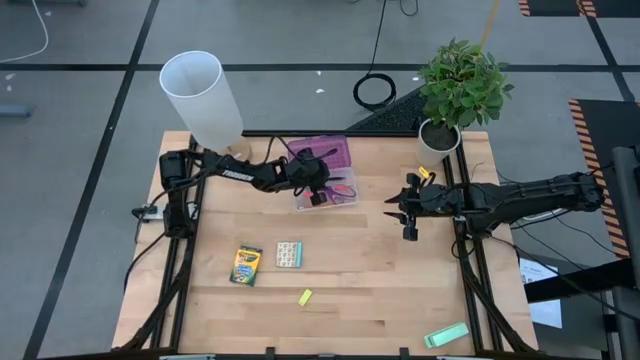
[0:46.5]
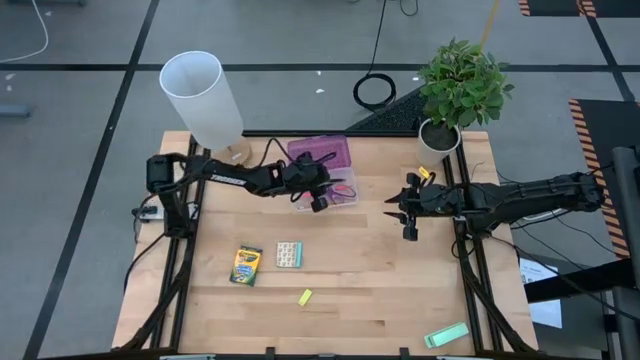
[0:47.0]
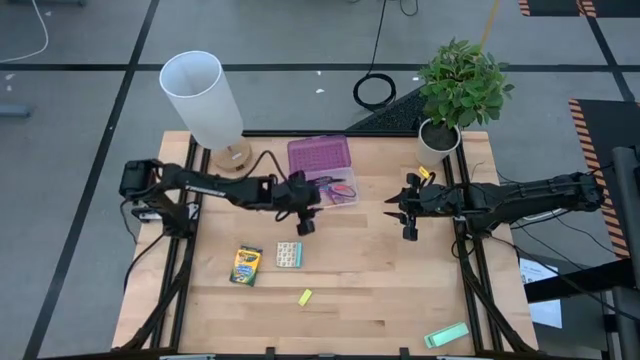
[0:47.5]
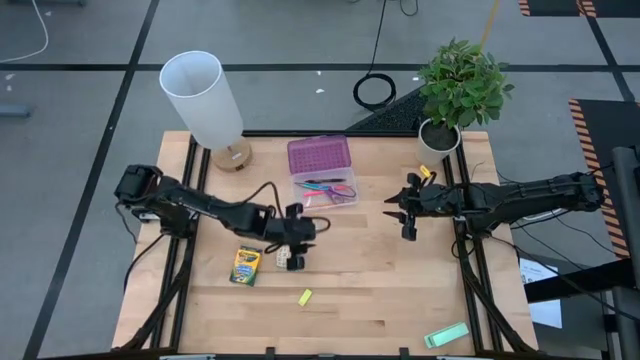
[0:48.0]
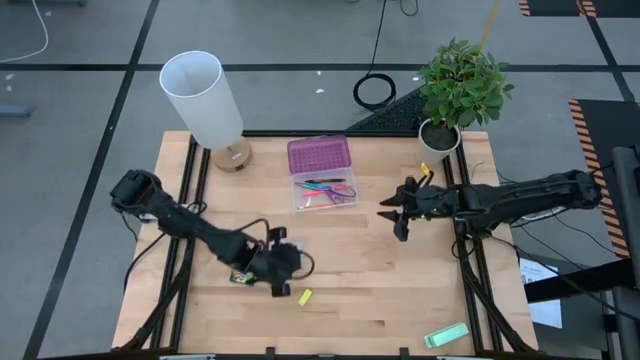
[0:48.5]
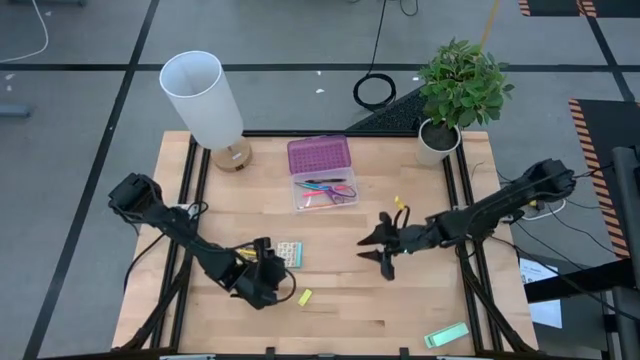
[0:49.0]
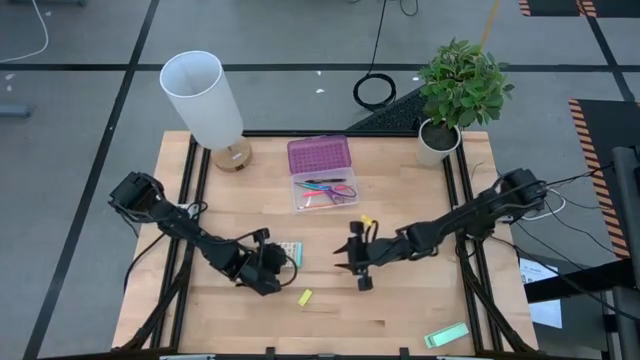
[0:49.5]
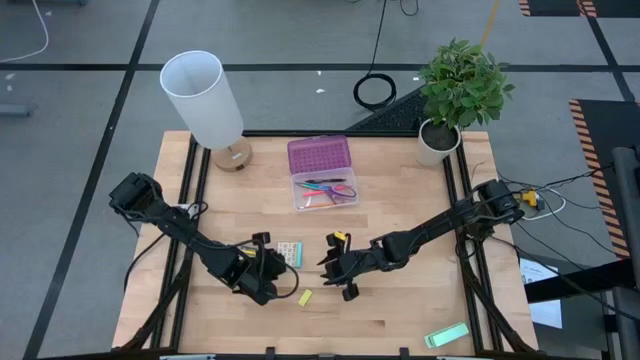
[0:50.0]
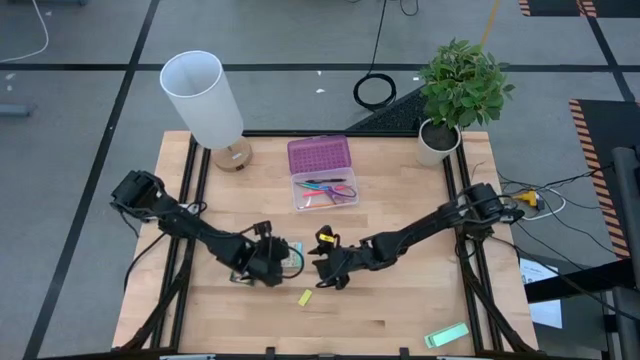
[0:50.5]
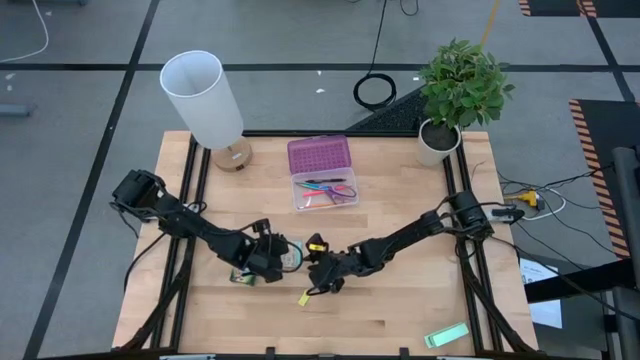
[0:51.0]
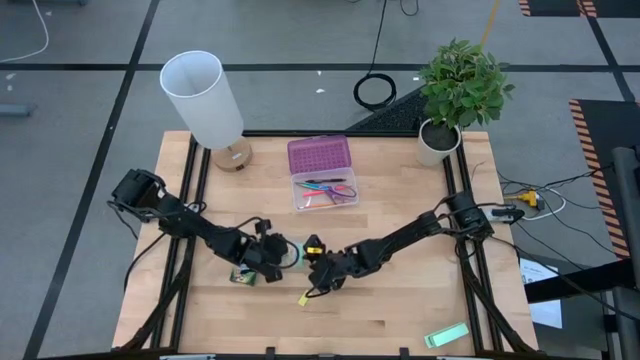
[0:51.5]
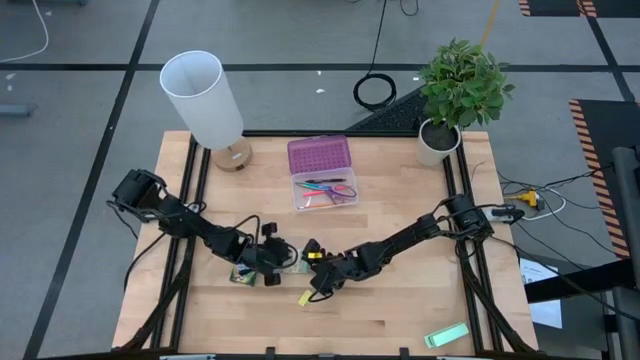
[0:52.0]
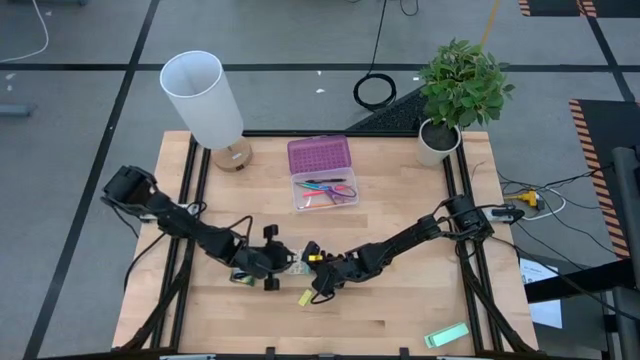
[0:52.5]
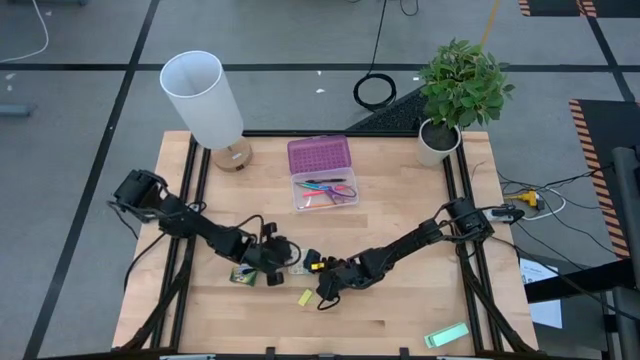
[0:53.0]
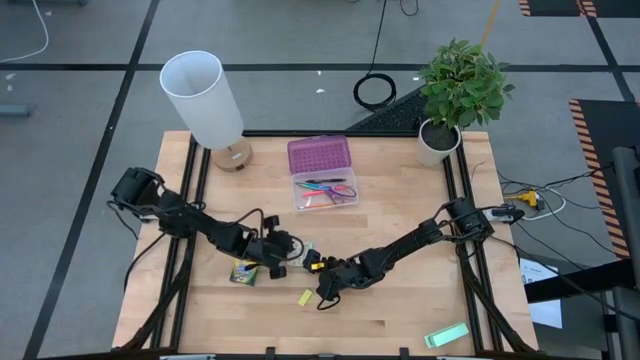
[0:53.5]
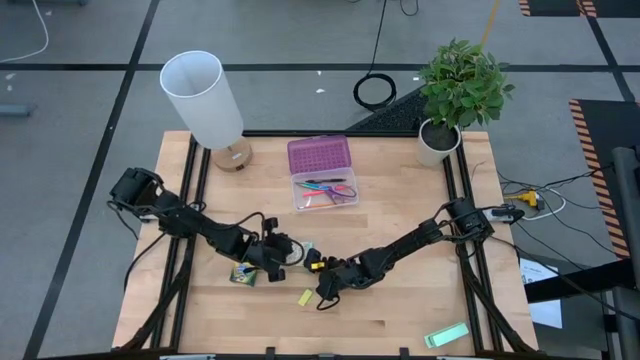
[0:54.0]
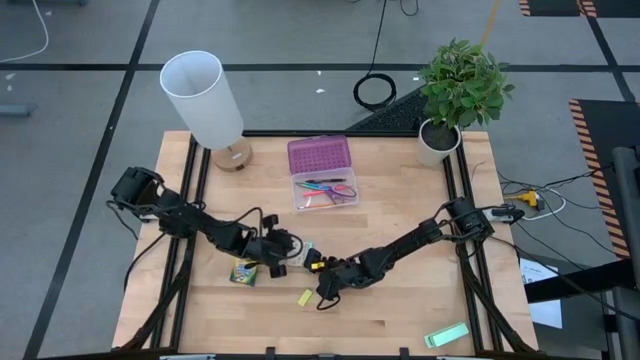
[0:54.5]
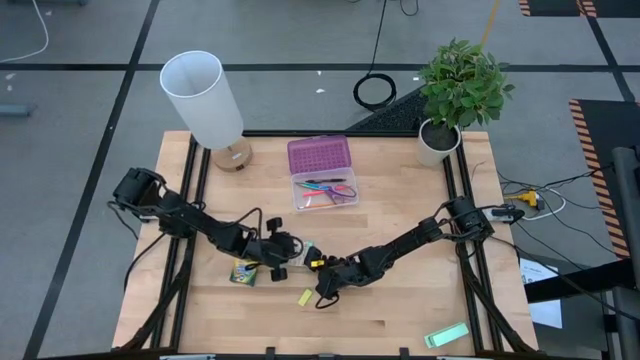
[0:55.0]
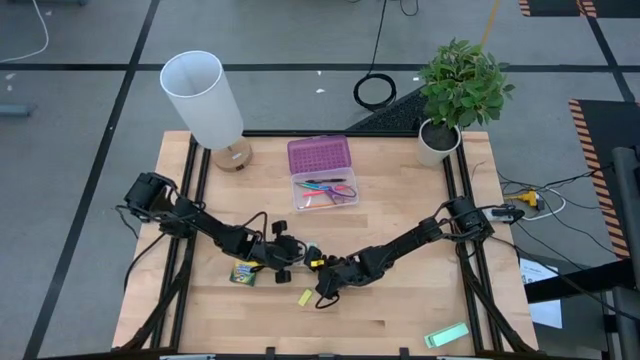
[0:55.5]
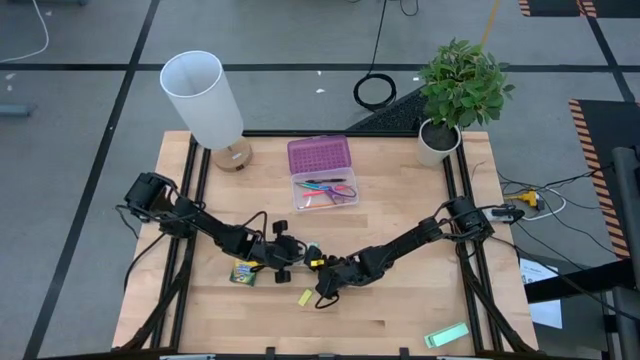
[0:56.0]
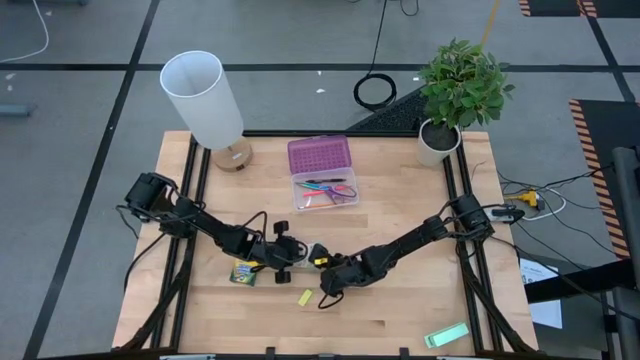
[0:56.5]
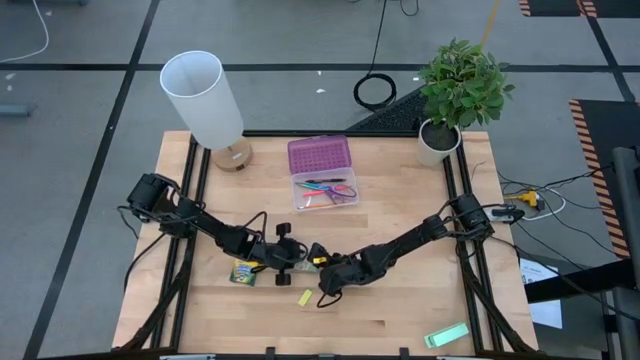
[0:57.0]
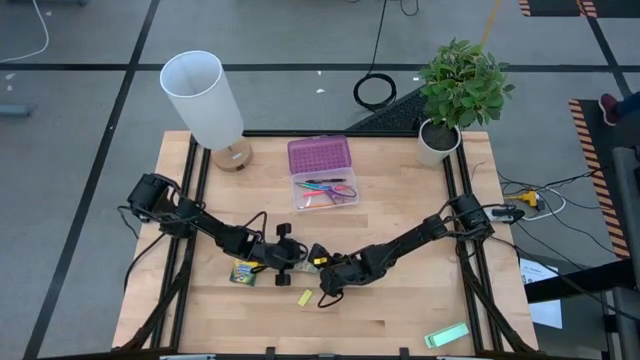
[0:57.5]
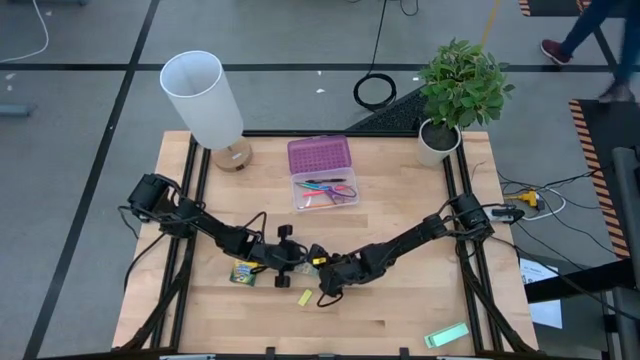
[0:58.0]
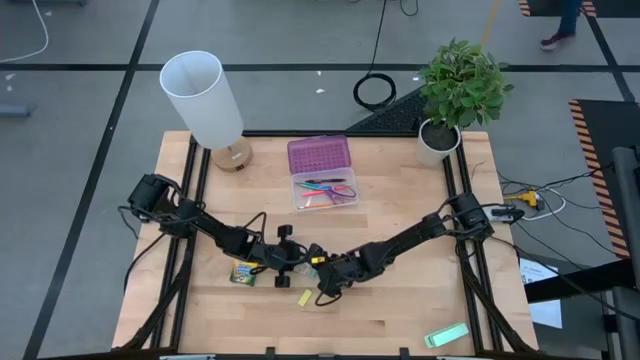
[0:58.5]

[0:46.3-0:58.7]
Task: Pack school essentials
Put the blue sticky notes into the purple supply box

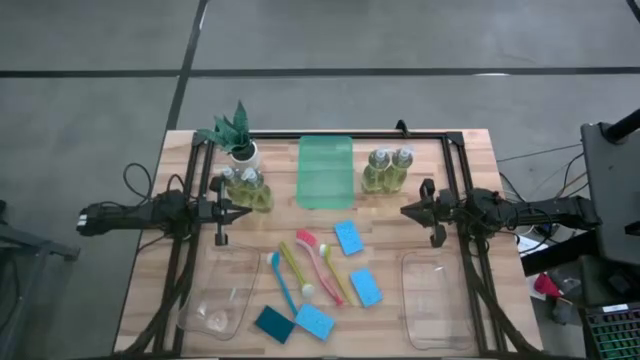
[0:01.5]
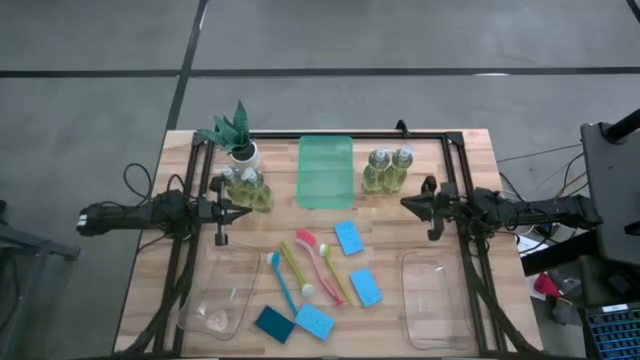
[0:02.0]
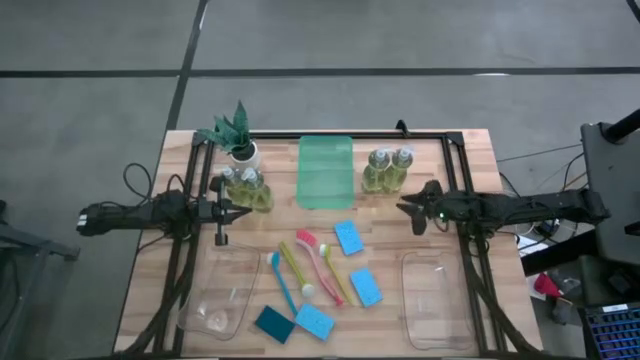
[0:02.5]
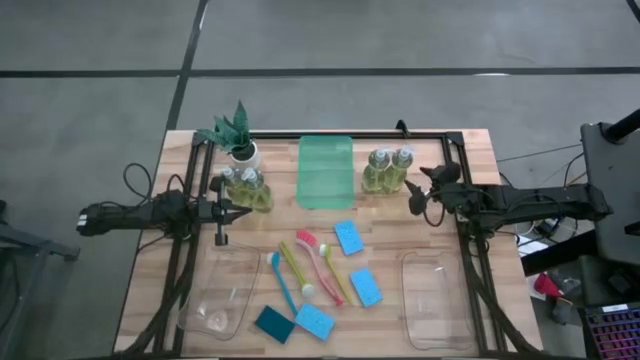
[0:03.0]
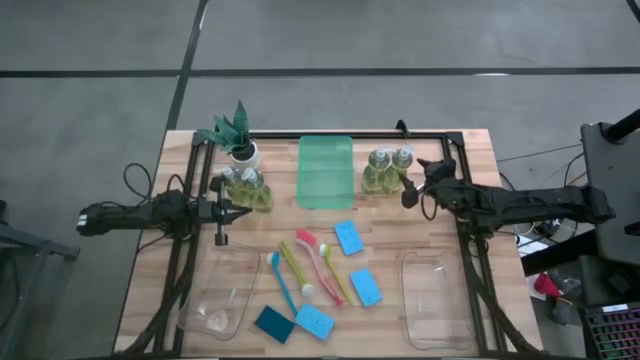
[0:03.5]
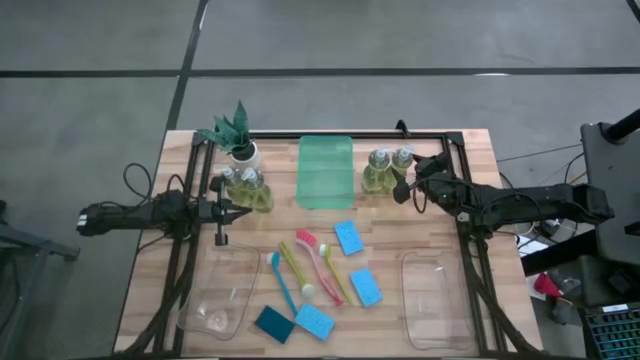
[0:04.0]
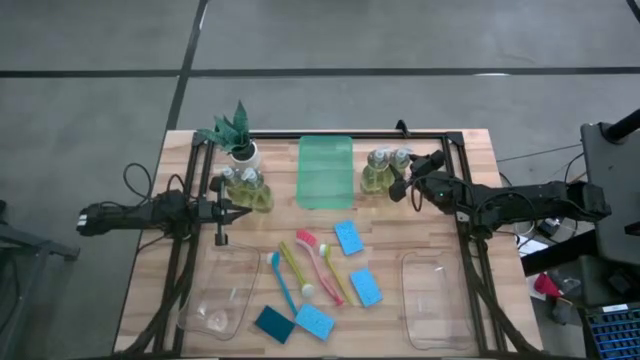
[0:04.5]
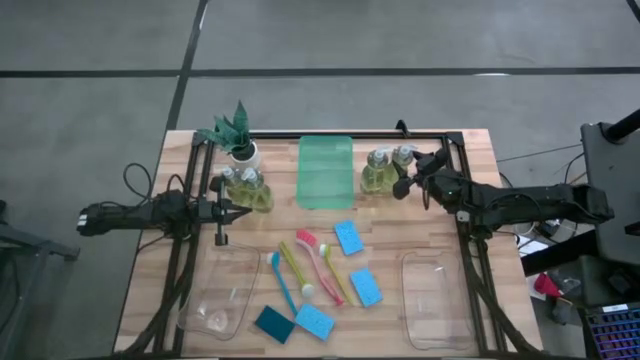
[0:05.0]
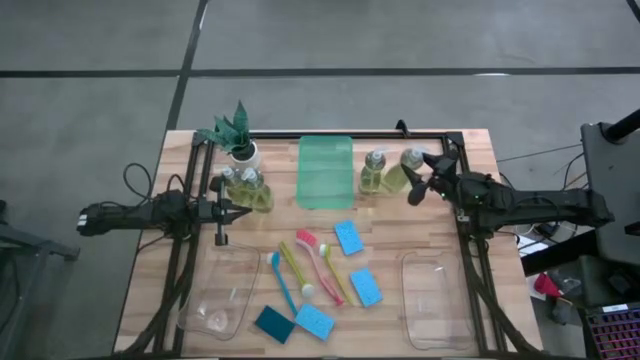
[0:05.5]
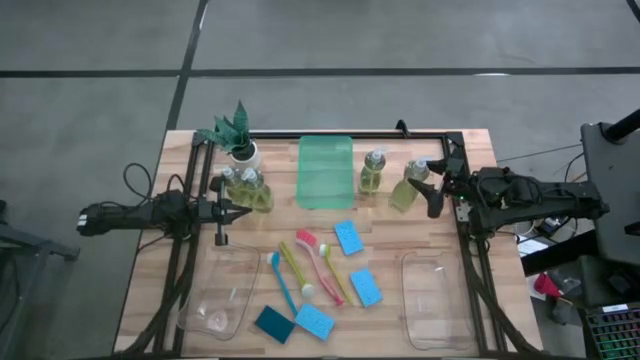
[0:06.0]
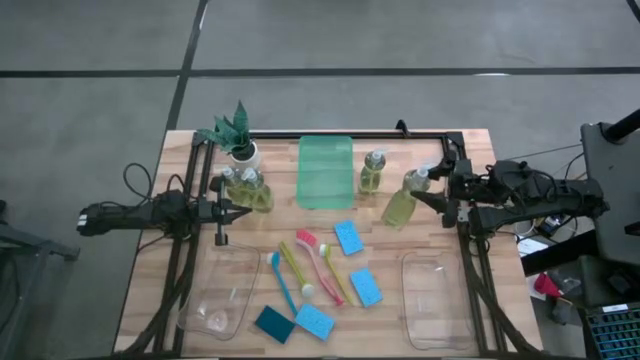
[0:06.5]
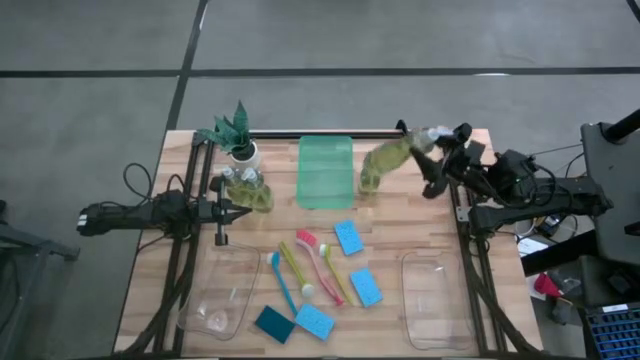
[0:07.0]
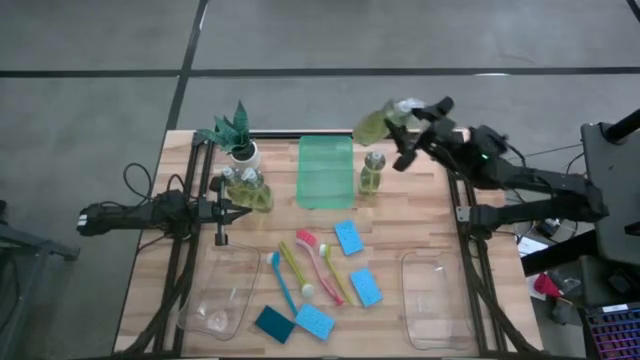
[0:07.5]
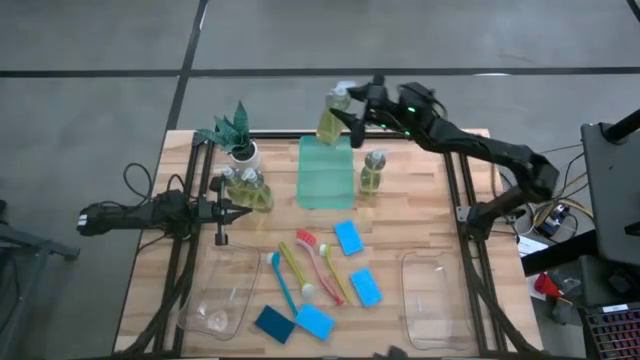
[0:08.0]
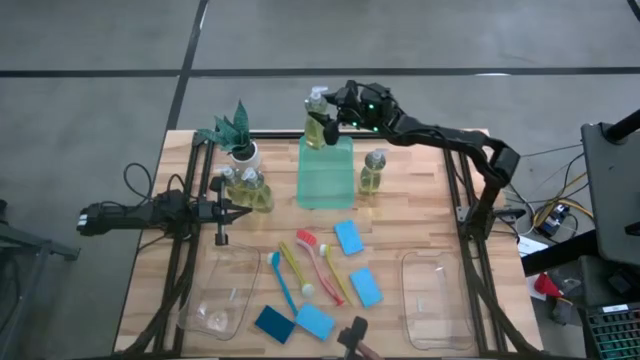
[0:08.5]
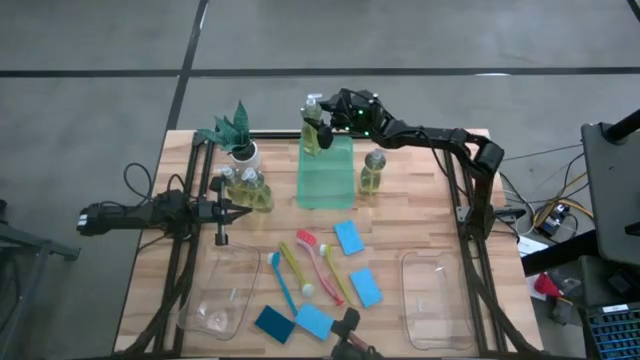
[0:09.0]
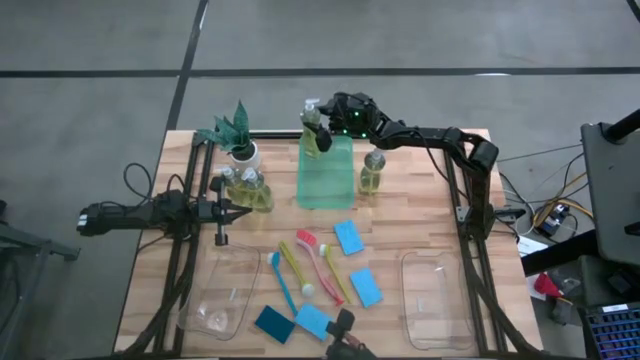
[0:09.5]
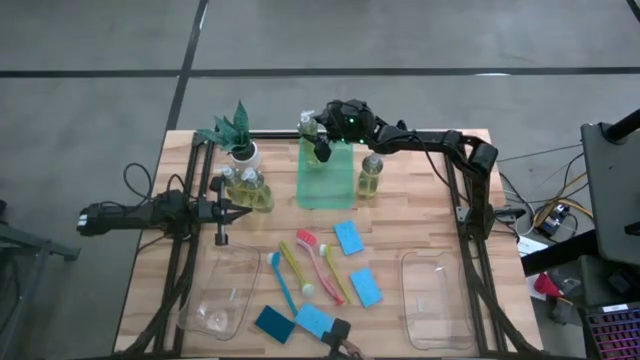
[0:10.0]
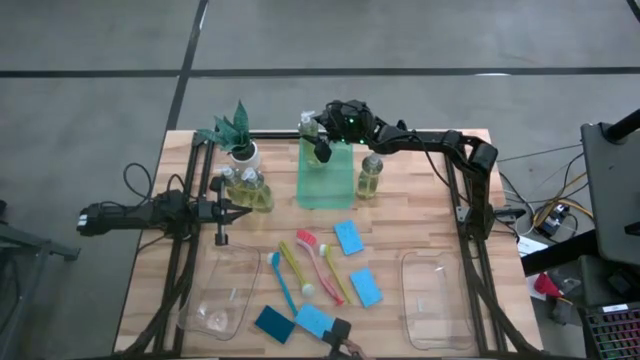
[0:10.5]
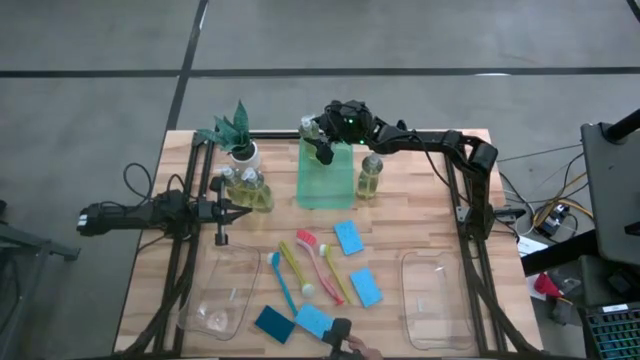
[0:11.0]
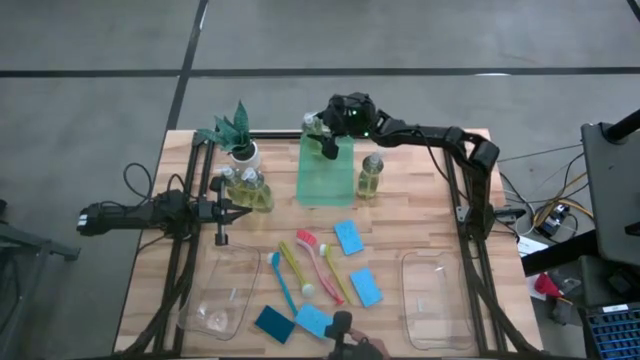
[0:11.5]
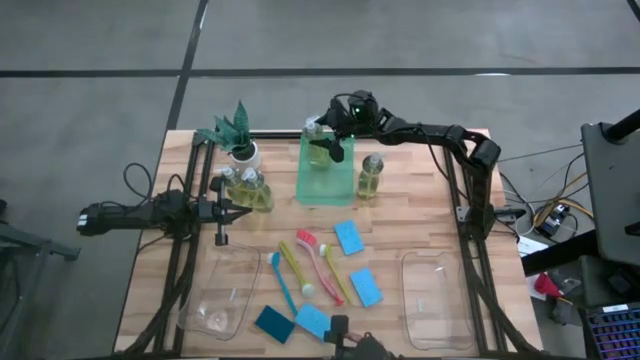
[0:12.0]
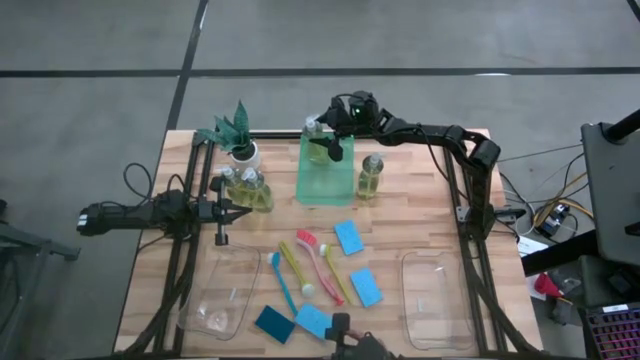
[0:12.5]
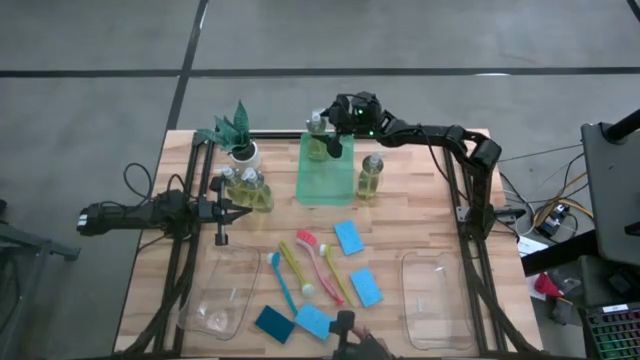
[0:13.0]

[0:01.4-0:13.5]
Task: Pick & Place Kitchen Sink Supplies
Put the top right dishwashing liquid into the green bin
